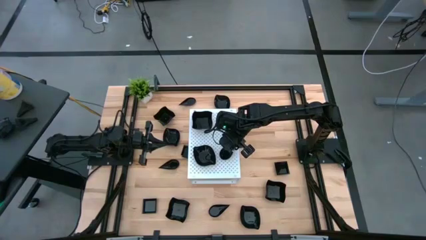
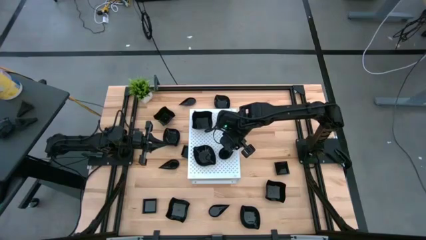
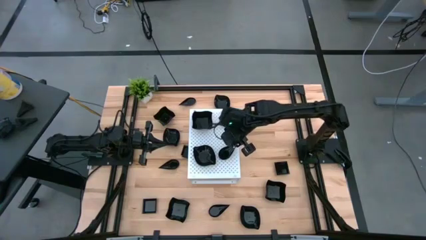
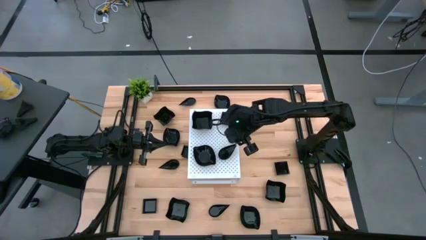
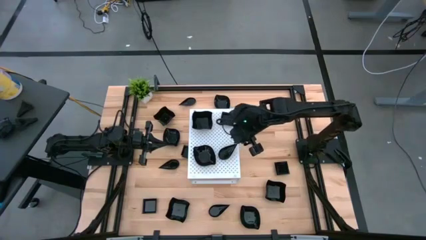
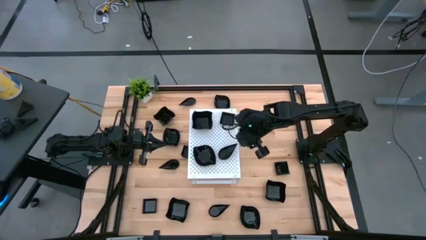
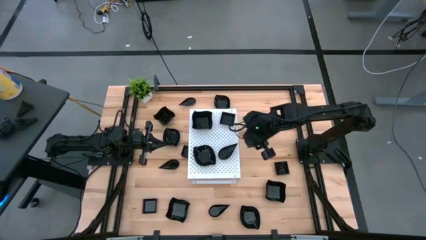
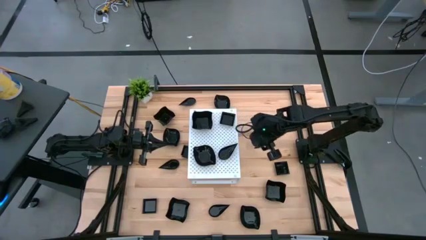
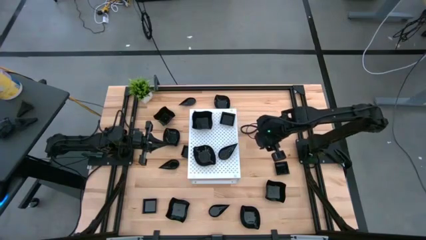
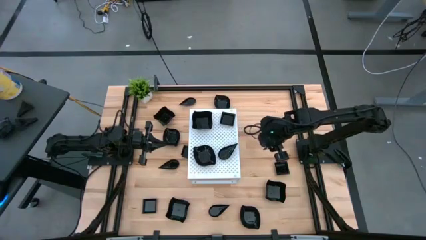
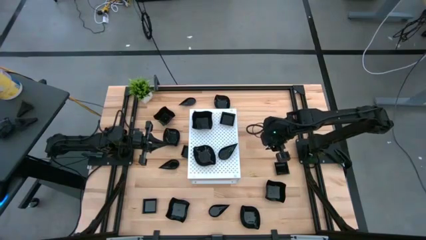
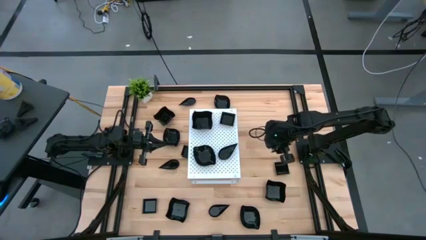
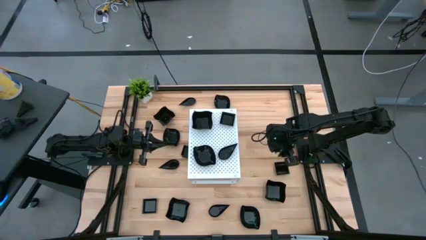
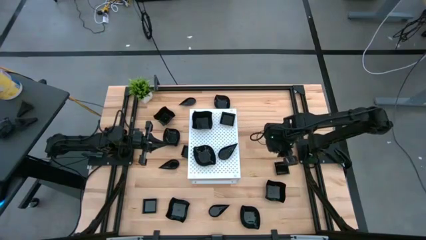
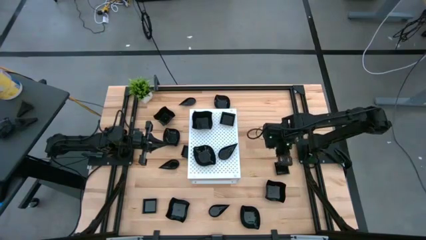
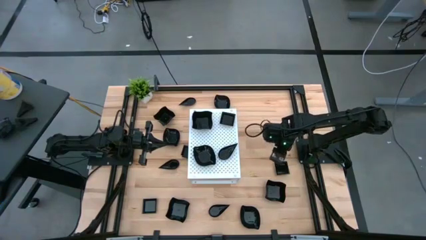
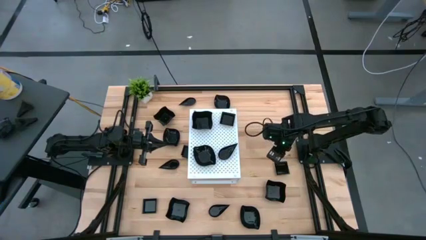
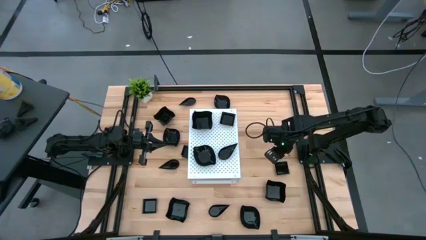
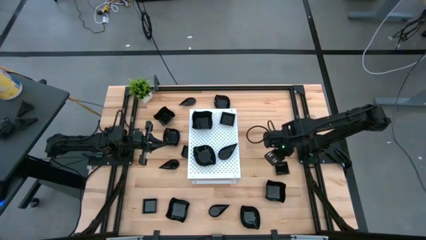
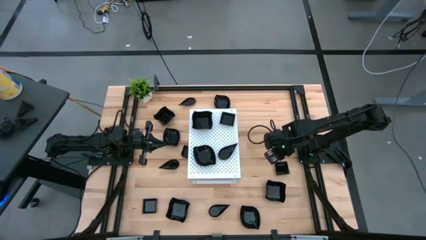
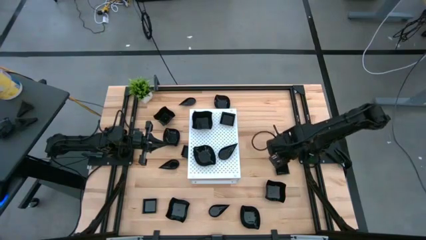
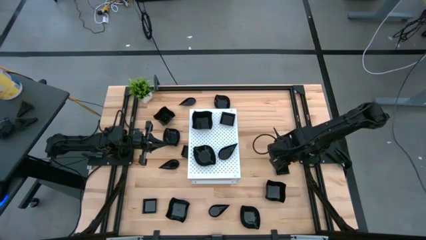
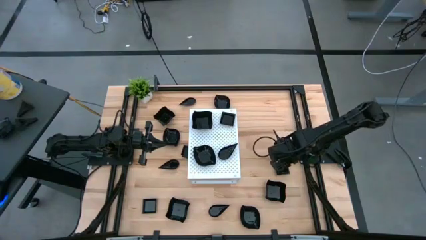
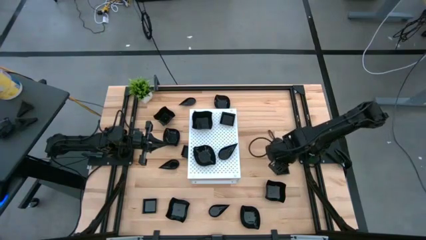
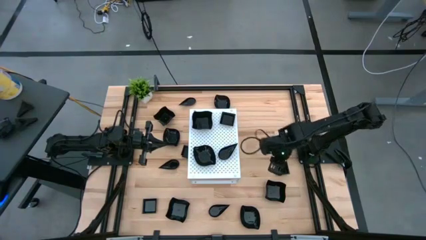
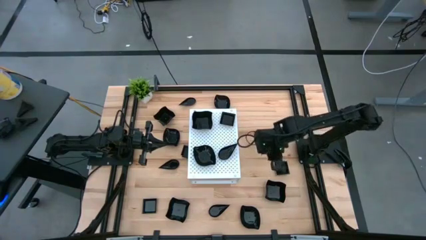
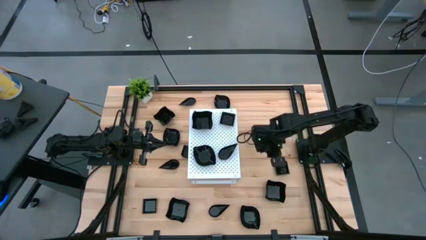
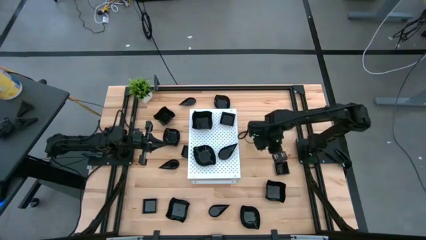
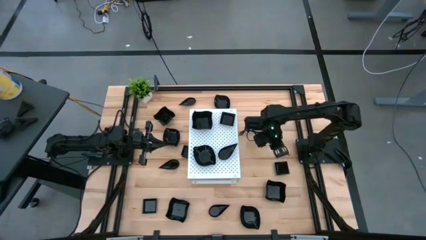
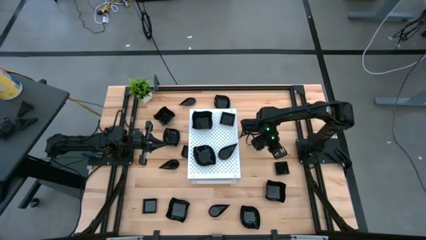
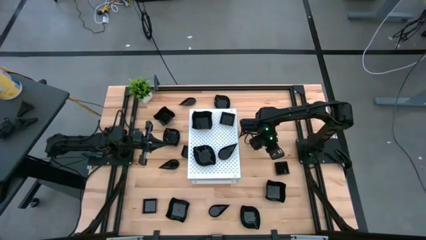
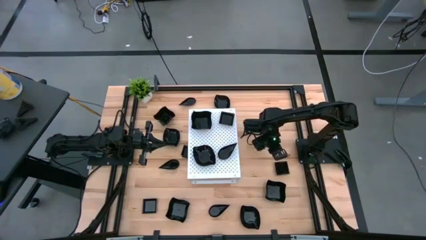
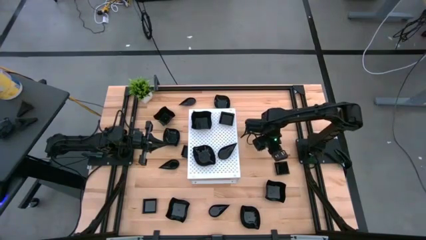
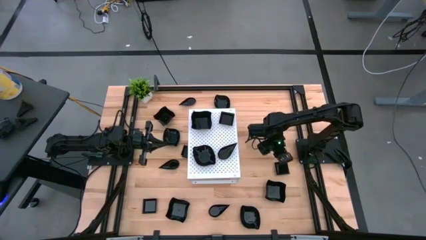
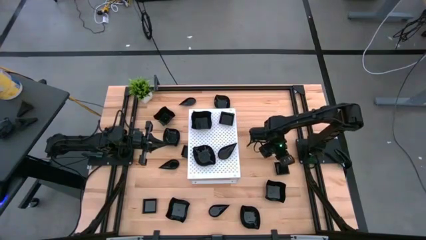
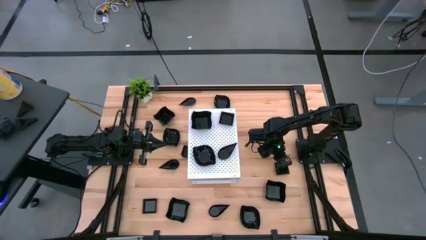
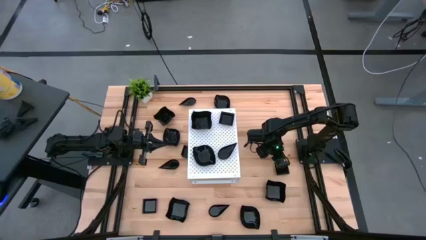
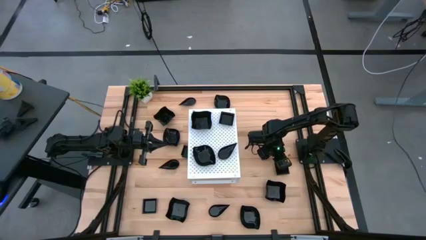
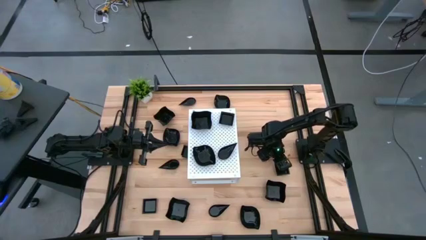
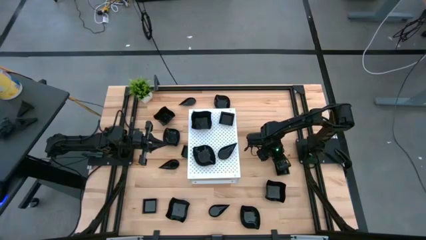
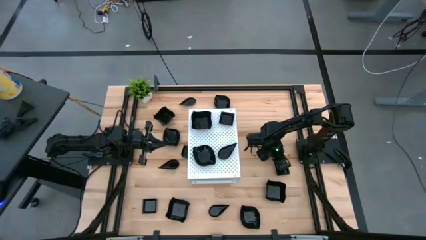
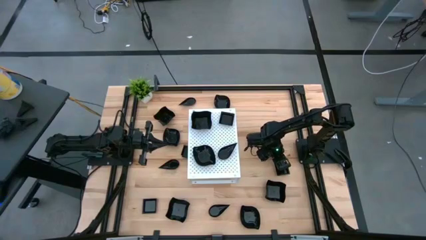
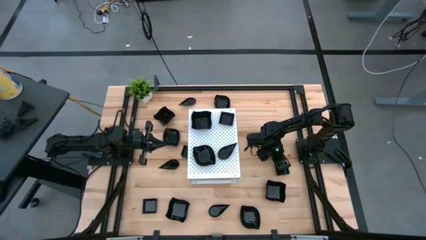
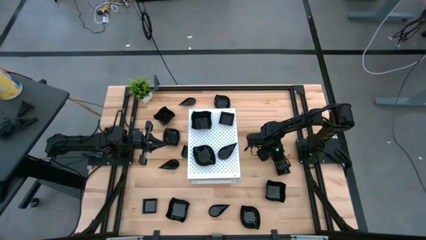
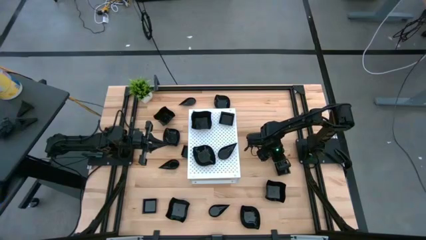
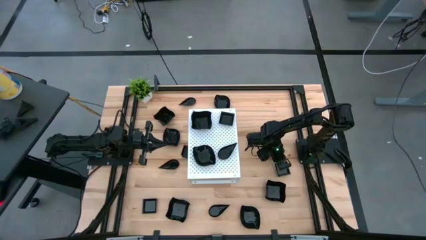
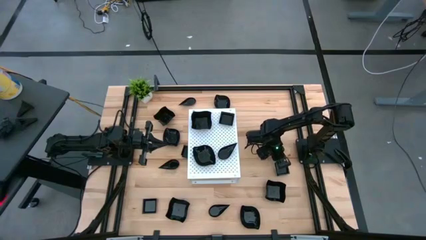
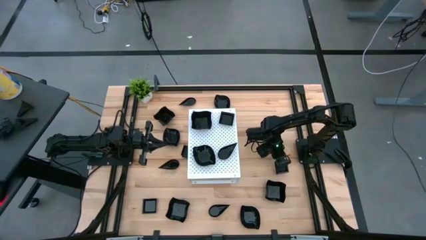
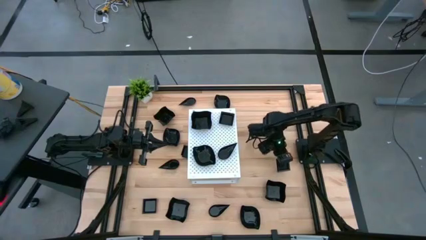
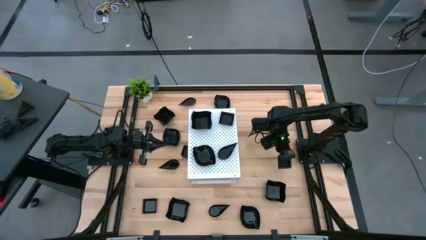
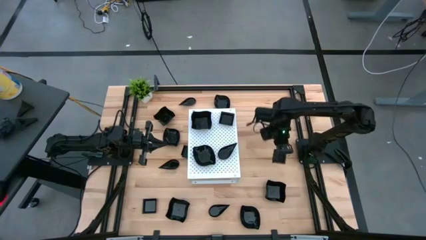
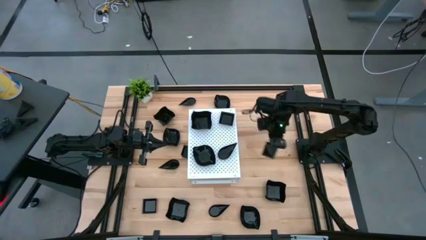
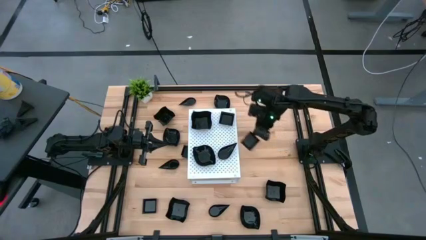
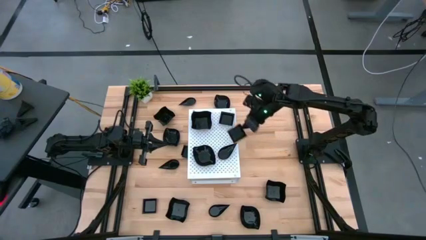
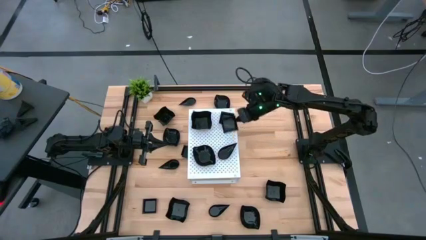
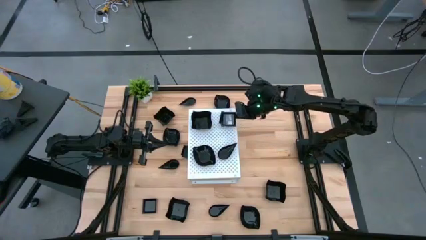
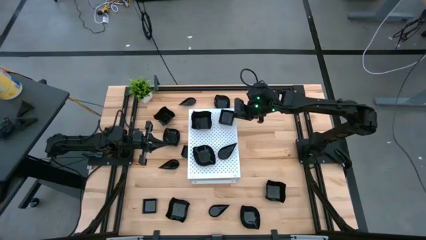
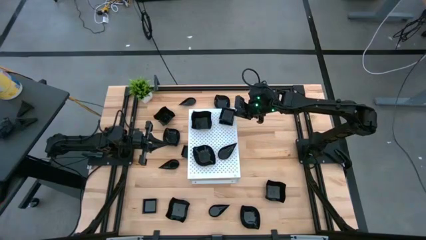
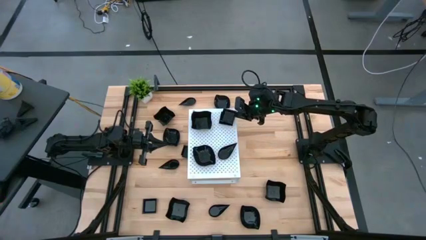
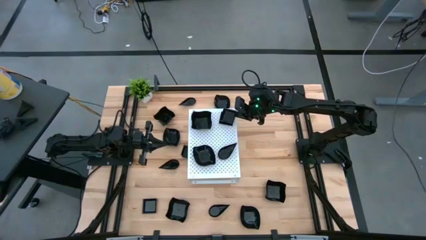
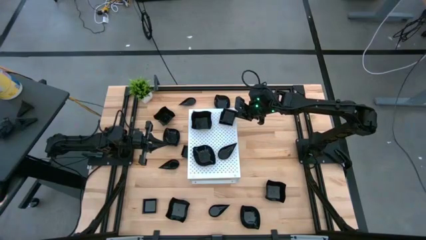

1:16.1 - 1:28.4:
Task: Pick & Place Mini shaped plates
Stack the black square plate on top of the other black square plate on the shelf
